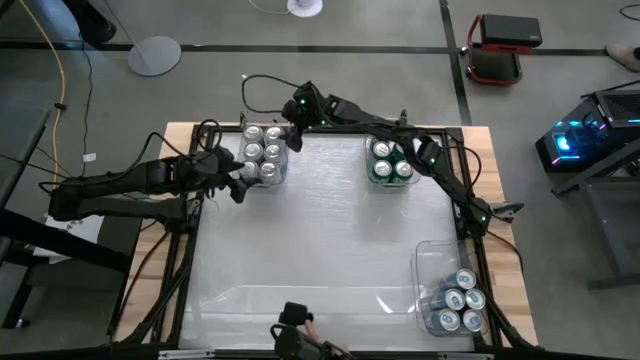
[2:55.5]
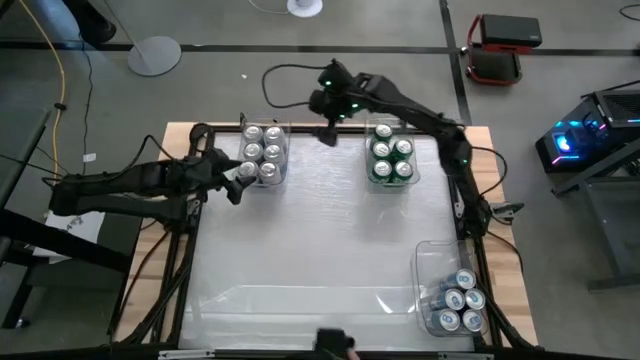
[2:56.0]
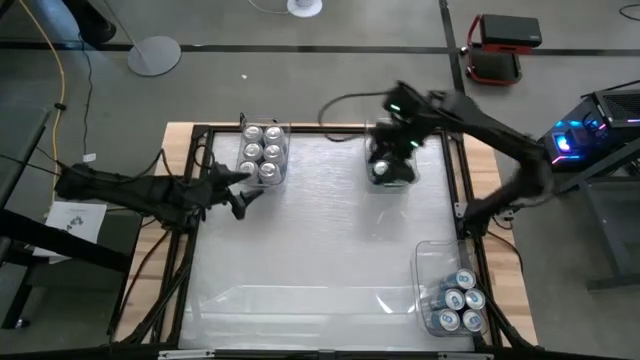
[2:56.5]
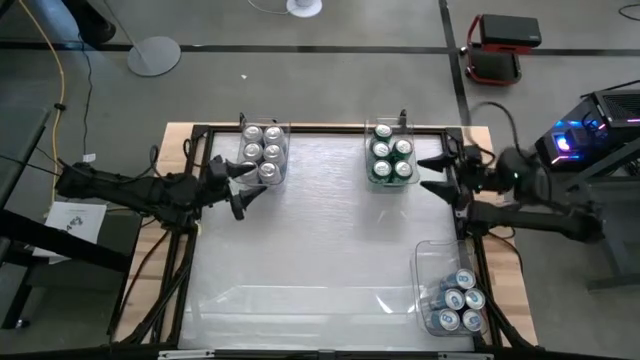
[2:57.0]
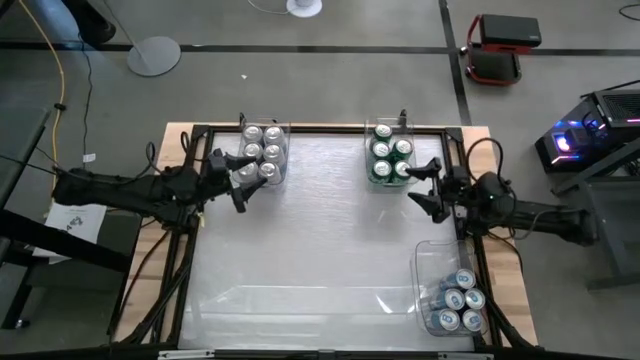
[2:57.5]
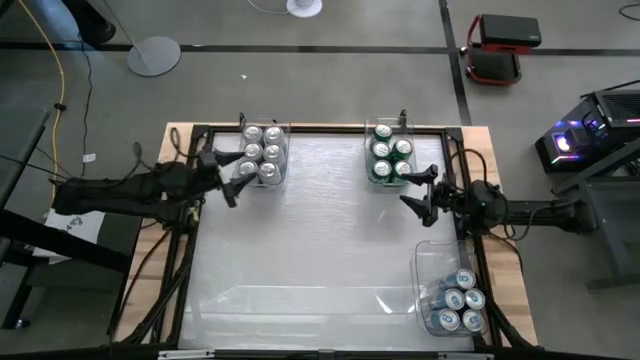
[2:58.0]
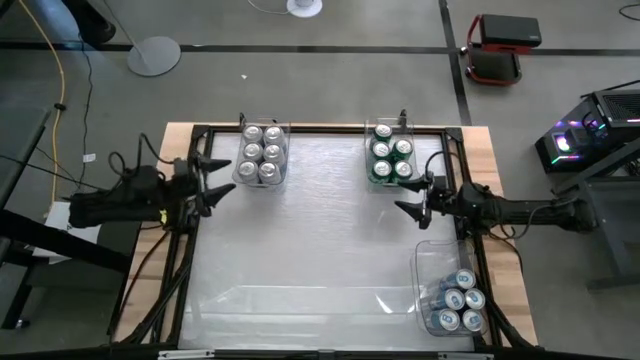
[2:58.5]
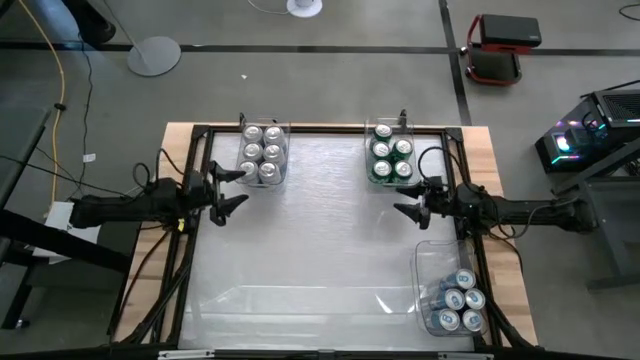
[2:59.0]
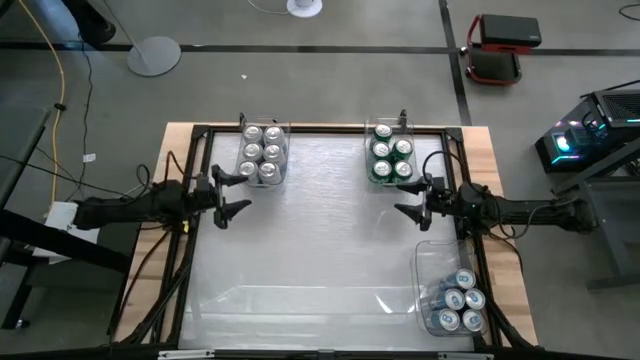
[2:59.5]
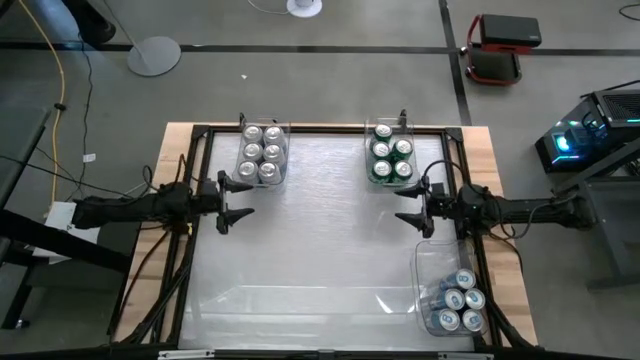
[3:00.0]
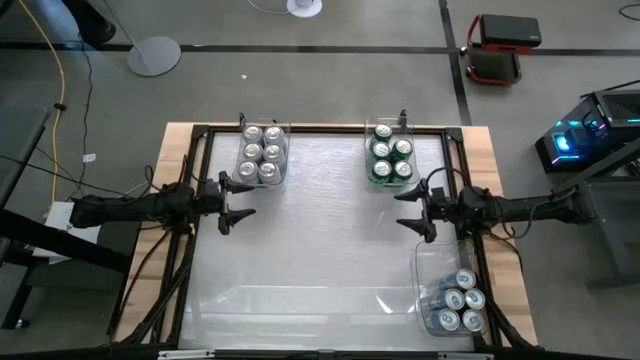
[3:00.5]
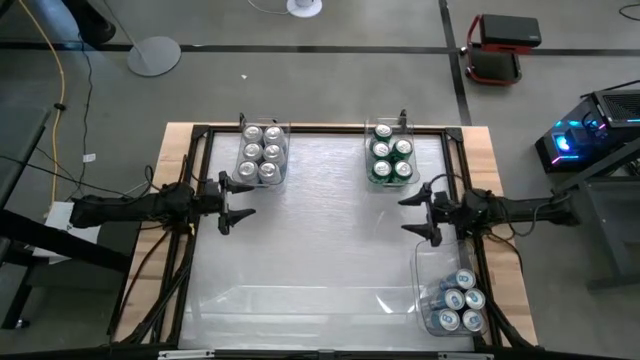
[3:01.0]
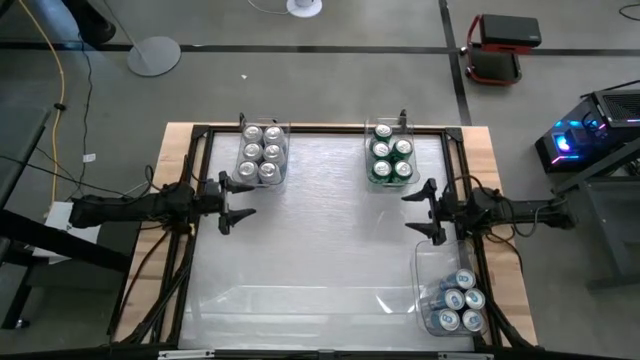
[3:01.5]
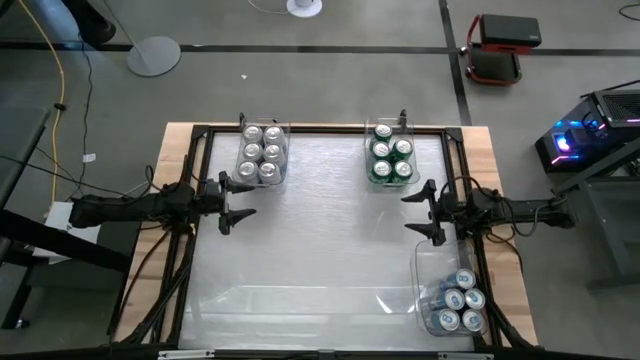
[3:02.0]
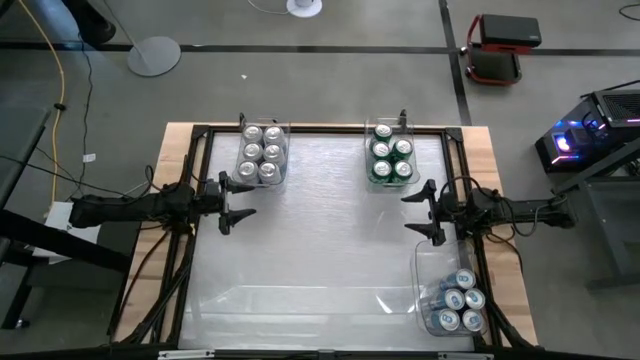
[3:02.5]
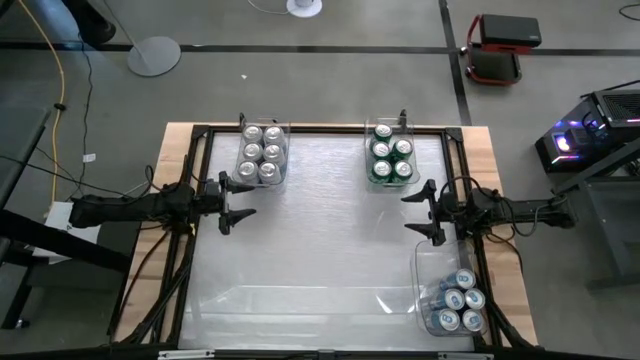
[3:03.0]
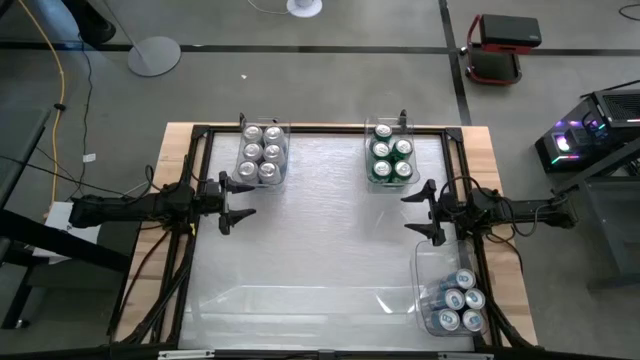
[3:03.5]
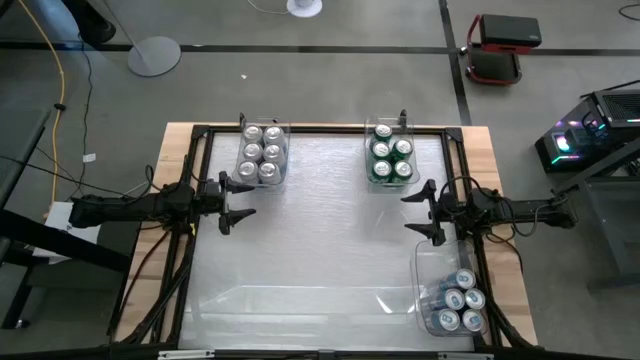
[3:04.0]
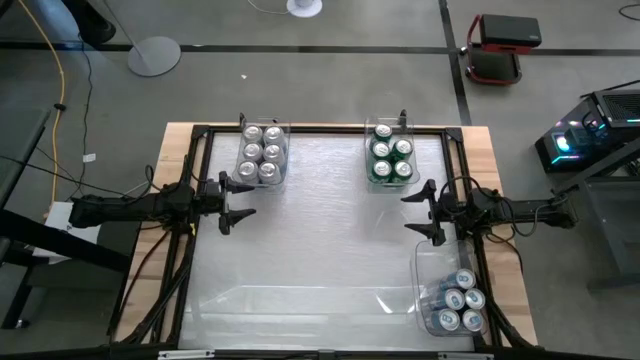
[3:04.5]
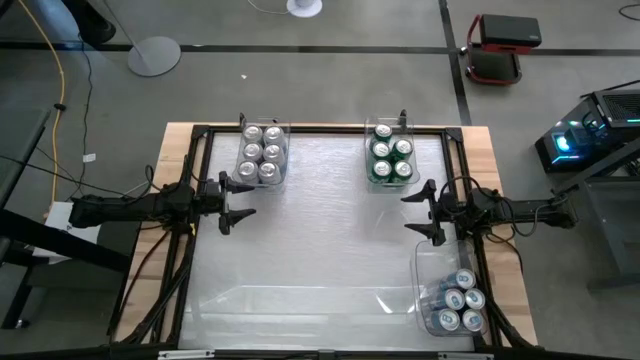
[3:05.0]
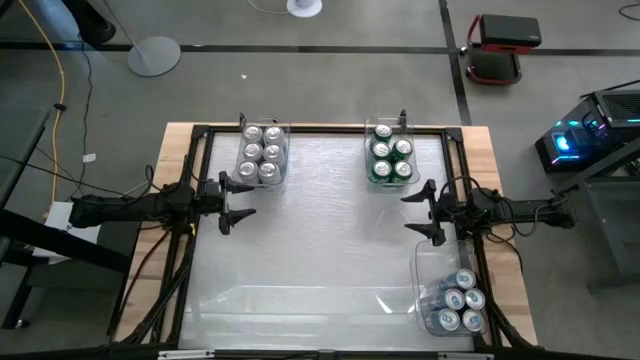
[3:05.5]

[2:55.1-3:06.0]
Task: Sort soda cans
Return to Home Position

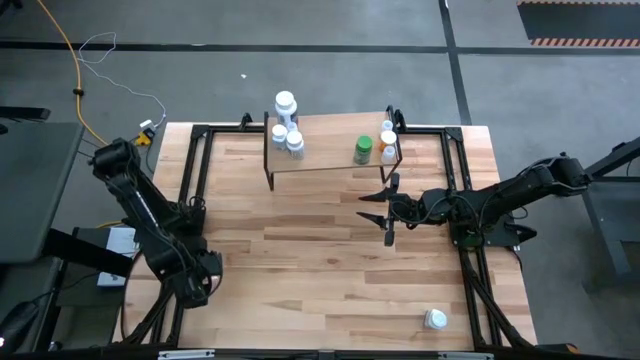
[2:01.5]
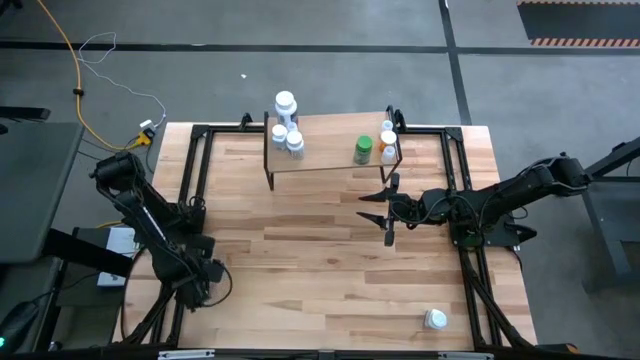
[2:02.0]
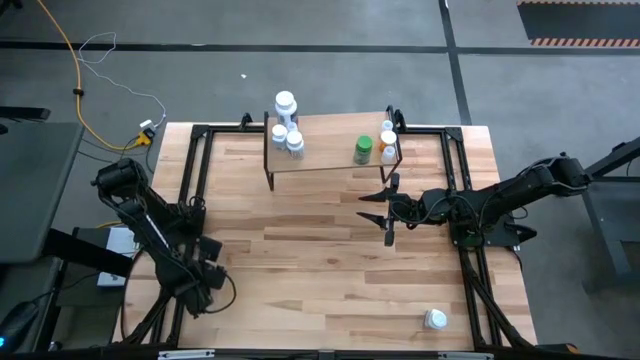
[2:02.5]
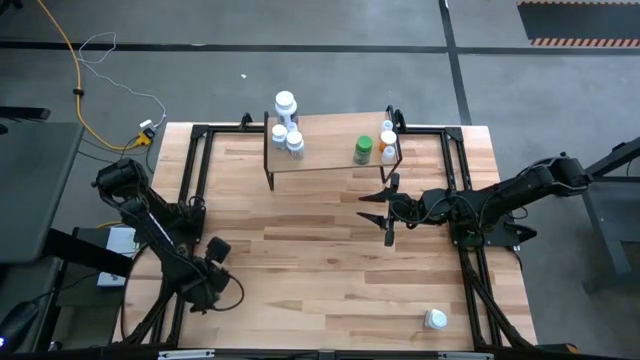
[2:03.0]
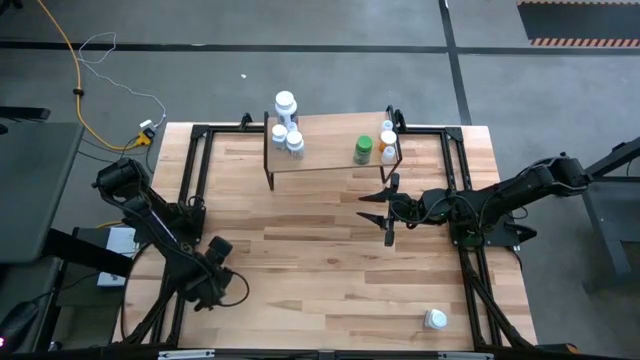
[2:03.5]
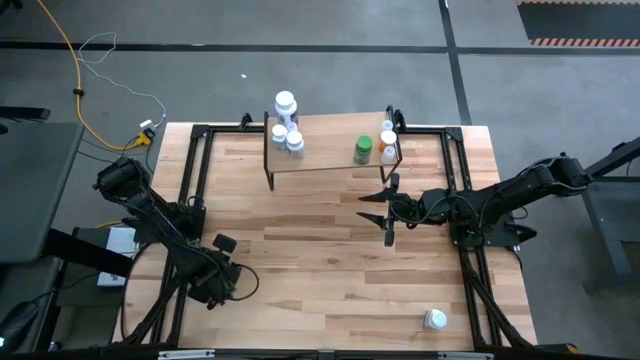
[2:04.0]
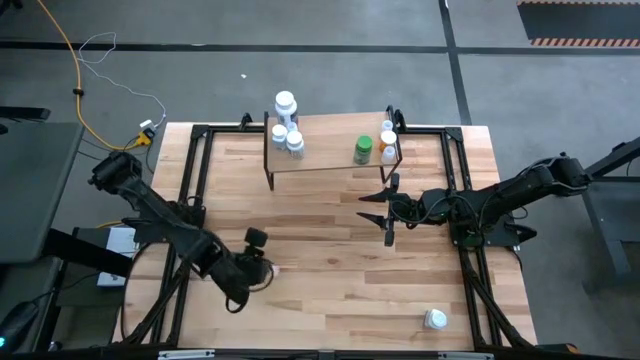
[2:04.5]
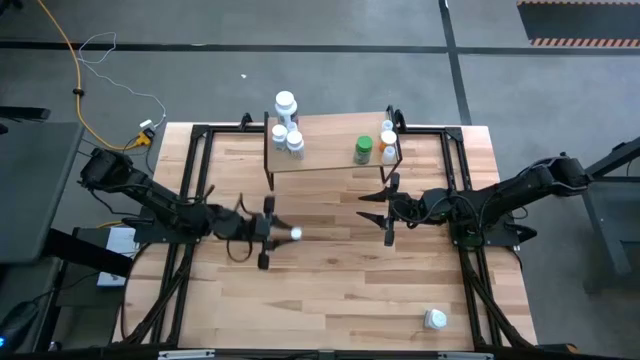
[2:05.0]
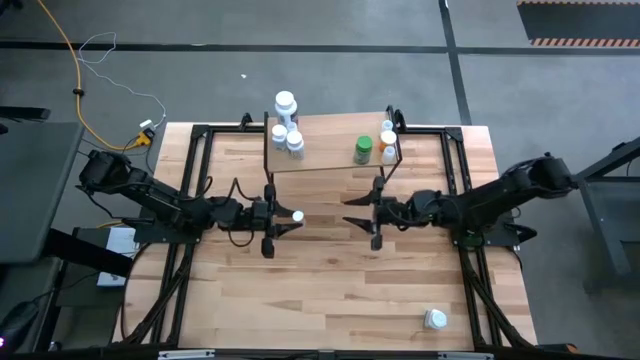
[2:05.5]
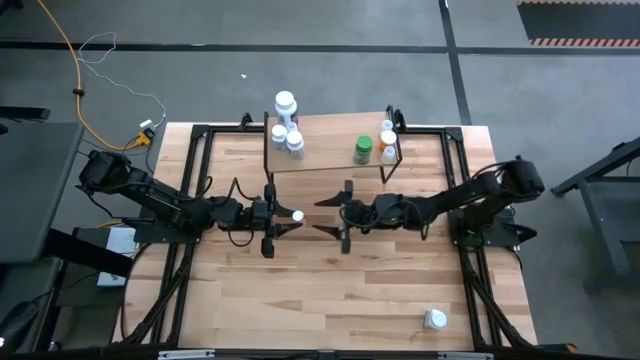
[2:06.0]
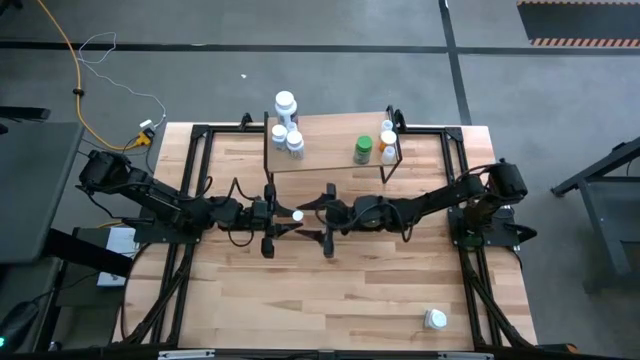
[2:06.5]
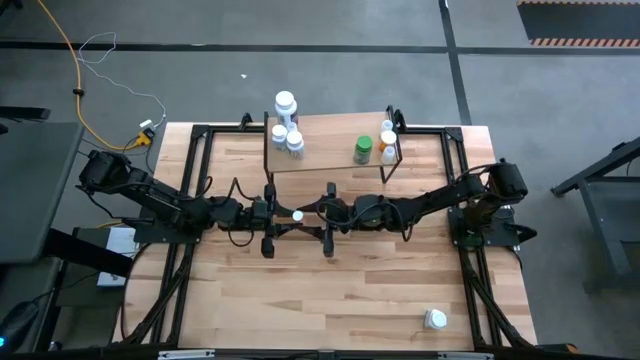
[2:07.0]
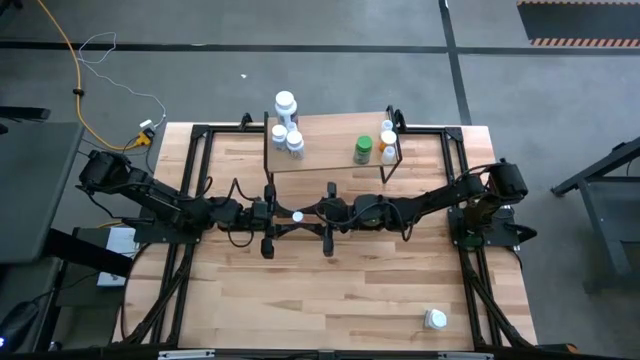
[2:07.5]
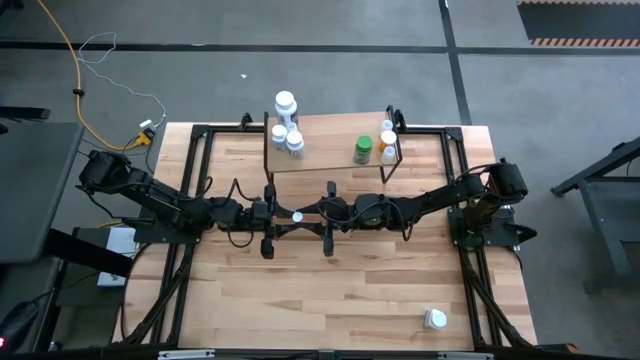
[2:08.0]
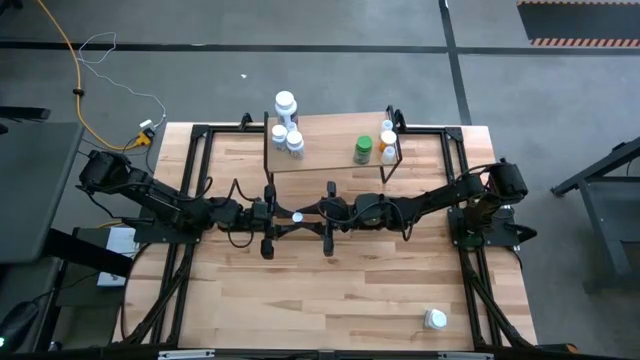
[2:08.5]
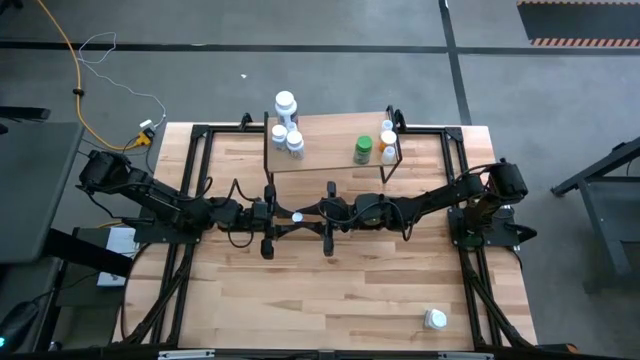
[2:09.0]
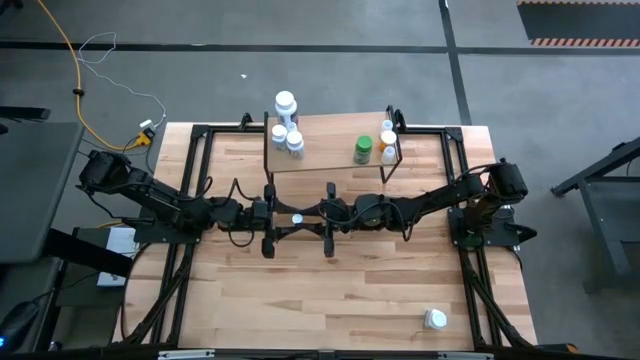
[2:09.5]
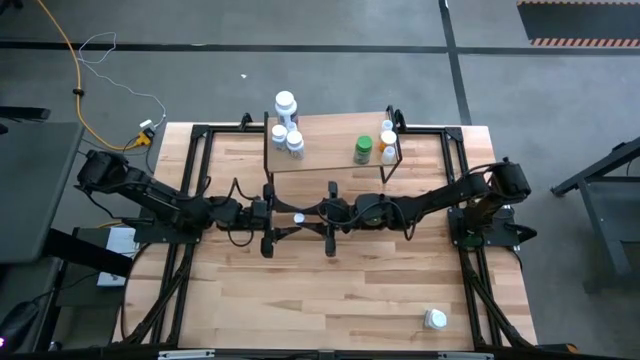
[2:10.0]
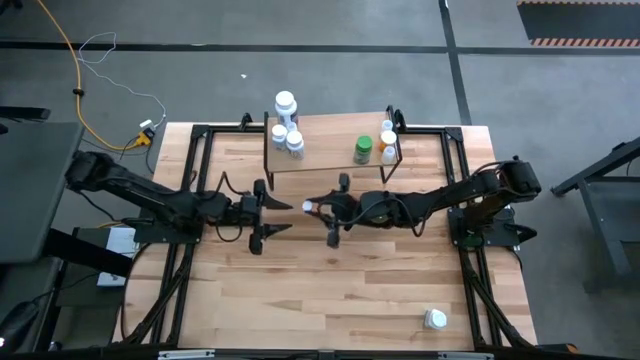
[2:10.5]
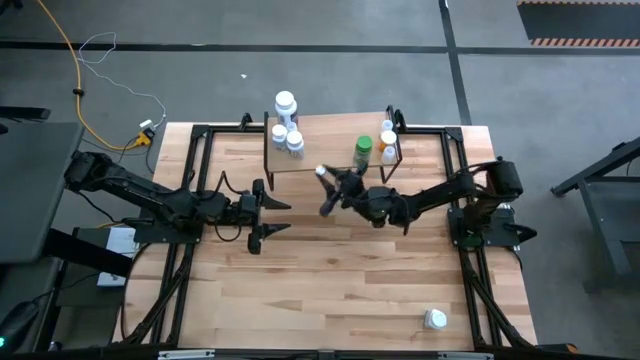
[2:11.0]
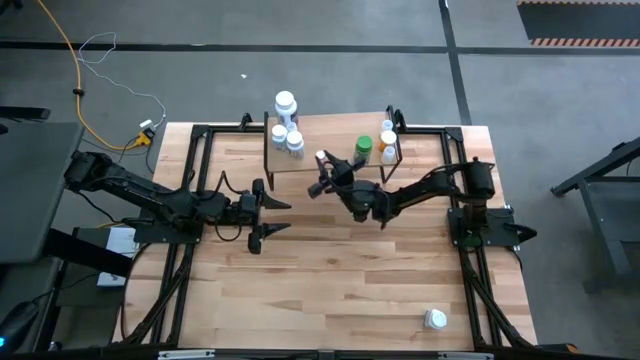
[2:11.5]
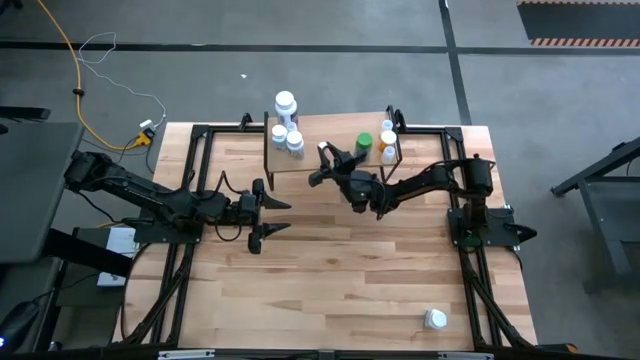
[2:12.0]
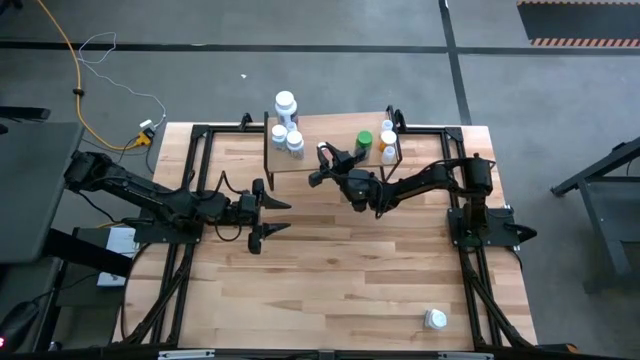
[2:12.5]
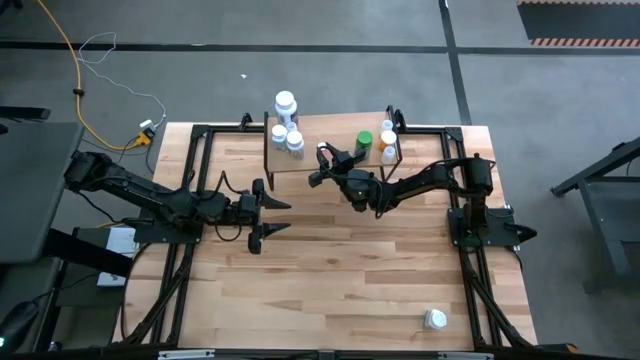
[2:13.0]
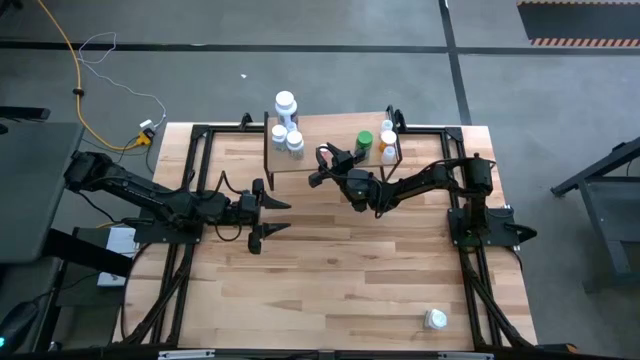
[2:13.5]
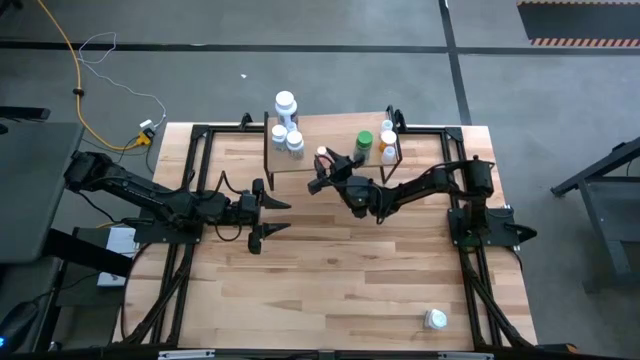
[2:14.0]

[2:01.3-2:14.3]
Task: Pick and place medicine bottles onto shelf by color
Put the pink pill bottle on the shelf
